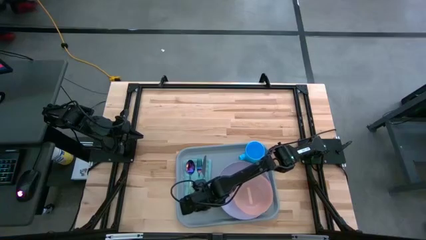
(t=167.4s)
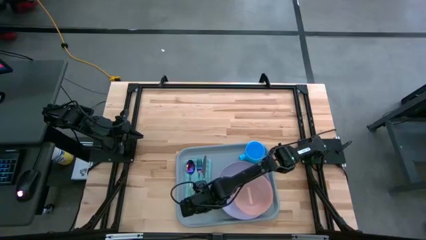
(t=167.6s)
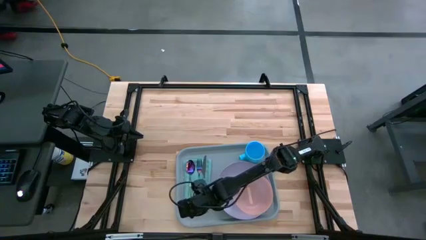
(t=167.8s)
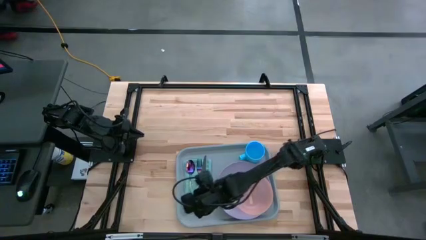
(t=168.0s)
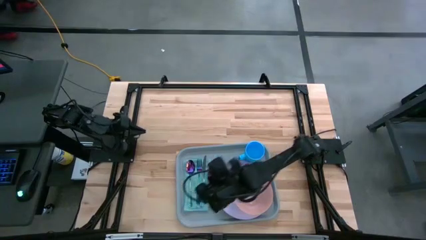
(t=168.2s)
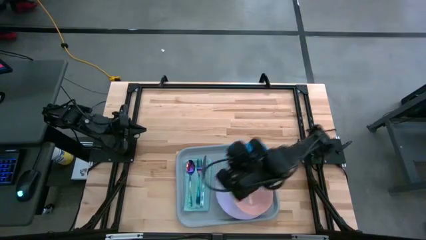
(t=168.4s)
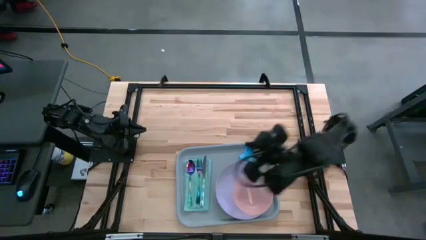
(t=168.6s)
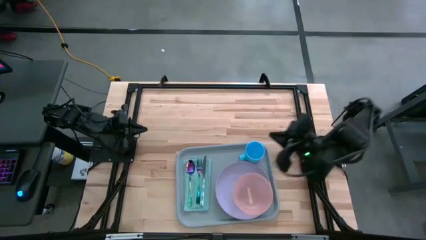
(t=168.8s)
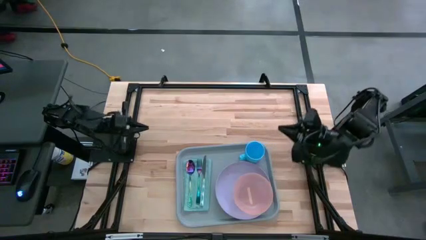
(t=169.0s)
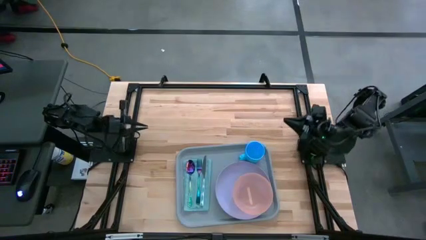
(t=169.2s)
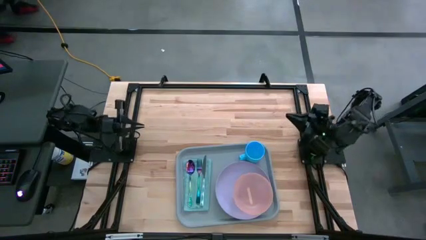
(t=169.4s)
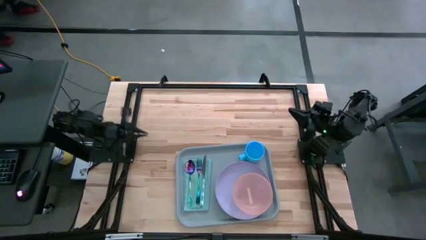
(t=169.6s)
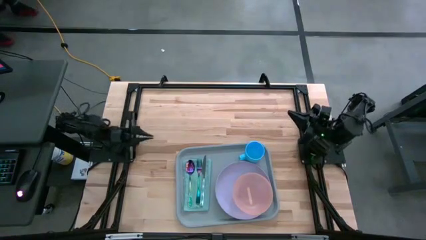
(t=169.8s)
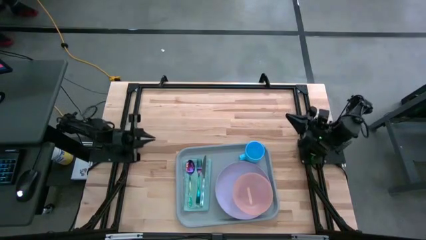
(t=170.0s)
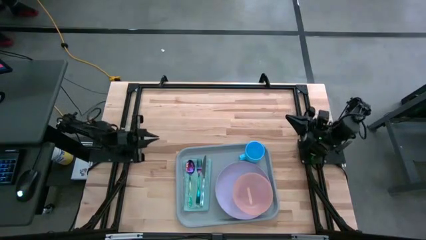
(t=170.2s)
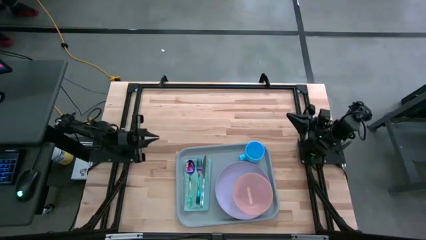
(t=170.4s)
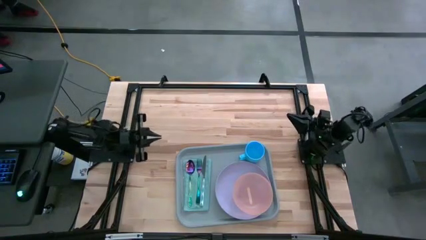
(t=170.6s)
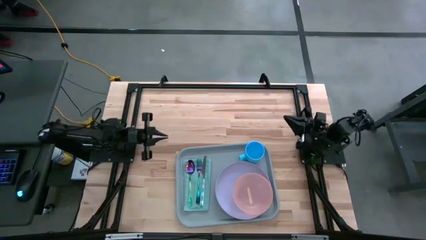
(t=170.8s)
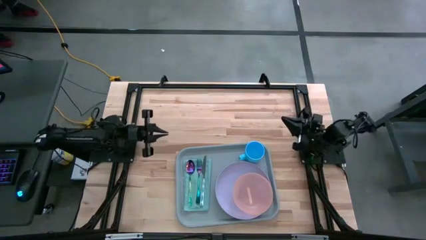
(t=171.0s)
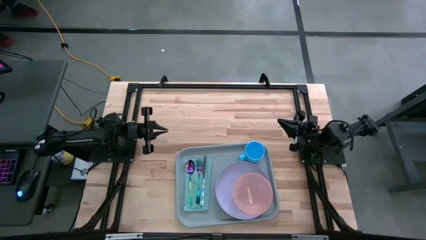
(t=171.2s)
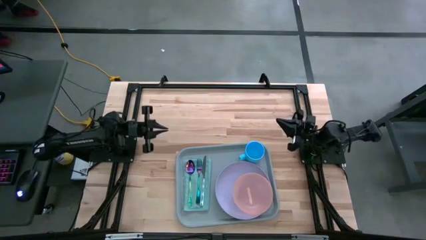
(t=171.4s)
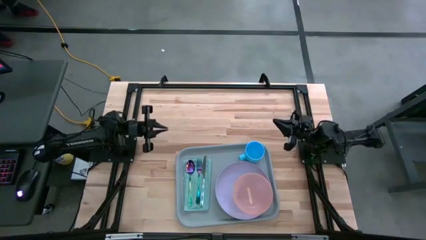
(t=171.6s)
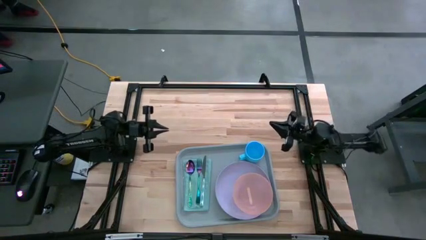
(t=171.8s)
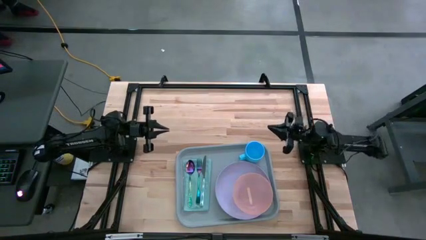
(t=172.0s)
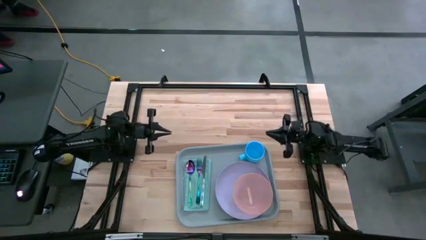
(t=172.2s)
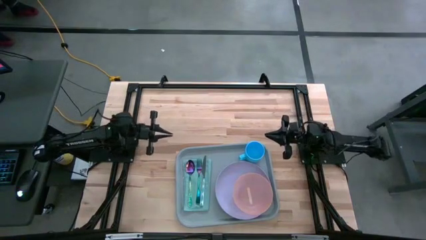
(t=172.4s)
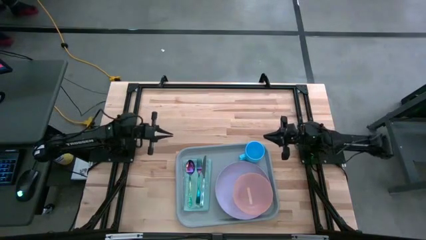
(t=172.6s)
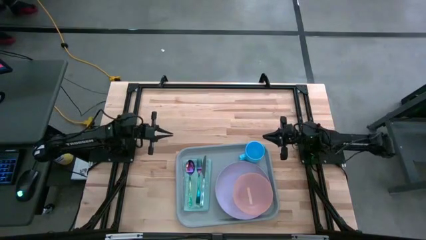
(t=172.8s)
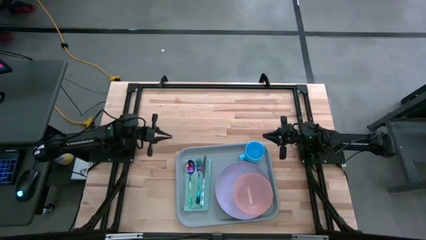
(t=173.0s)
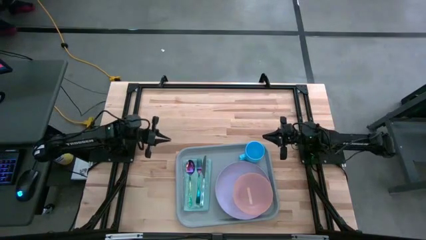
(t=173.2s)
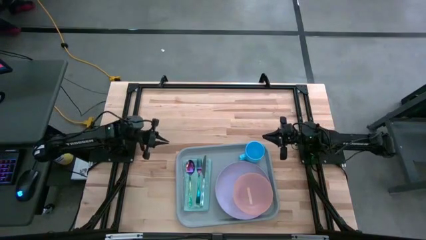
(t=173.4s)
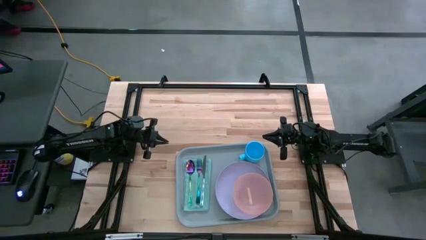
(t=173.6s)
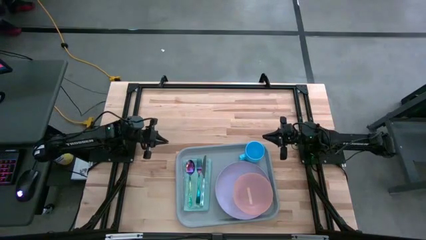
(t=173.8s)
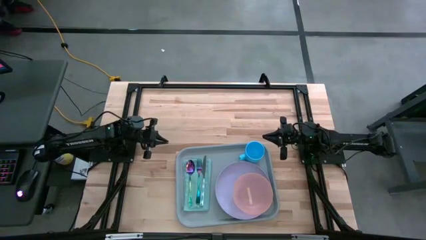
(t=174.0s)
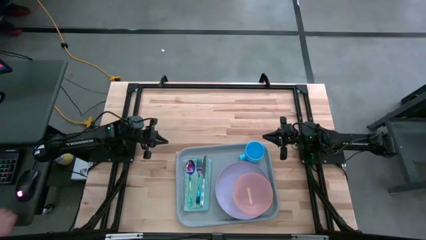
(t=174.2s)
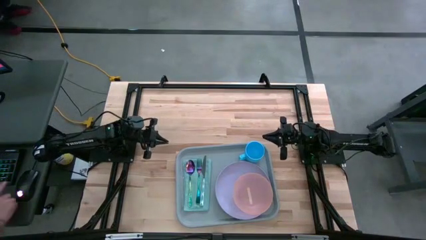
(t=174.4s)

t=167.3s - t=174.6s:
Task: Set up tray
Return to Home Position

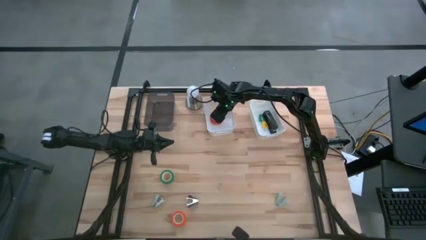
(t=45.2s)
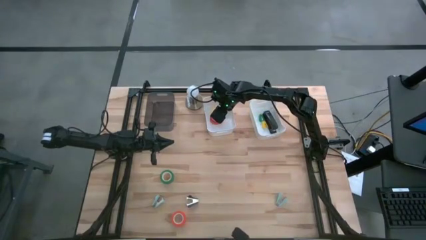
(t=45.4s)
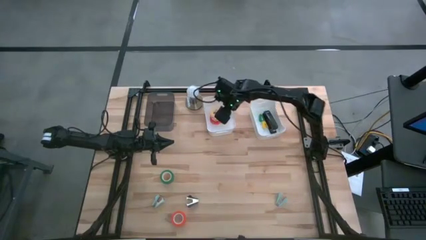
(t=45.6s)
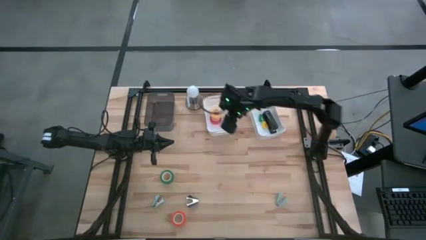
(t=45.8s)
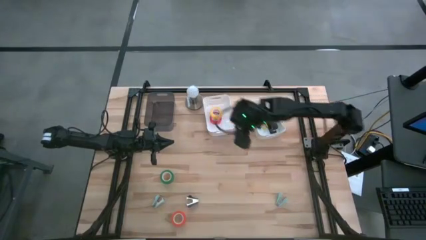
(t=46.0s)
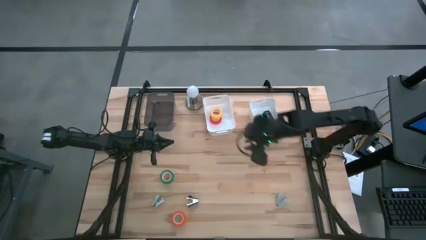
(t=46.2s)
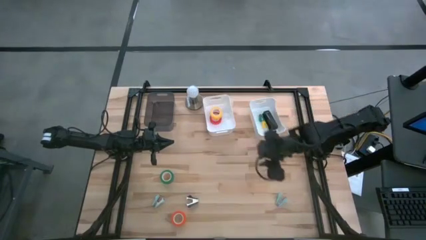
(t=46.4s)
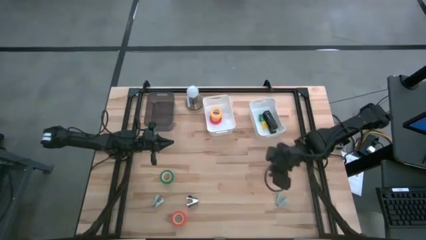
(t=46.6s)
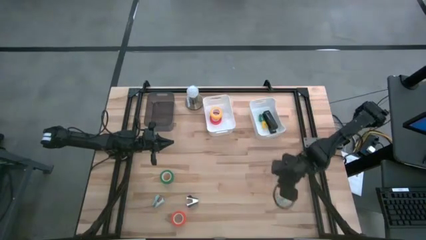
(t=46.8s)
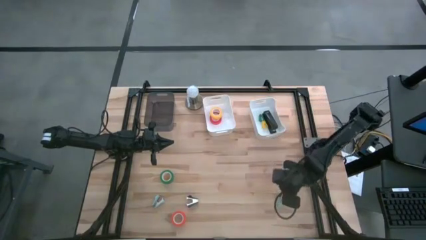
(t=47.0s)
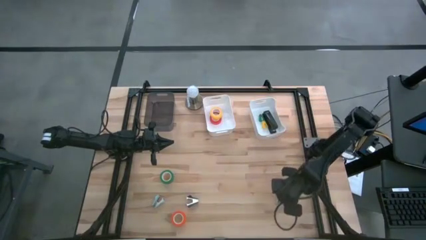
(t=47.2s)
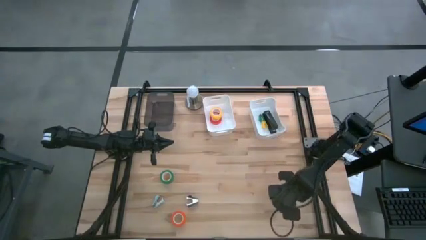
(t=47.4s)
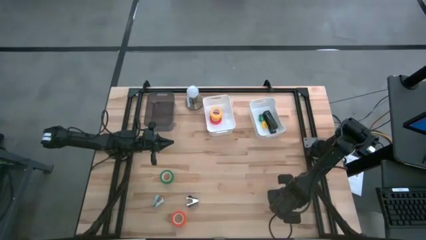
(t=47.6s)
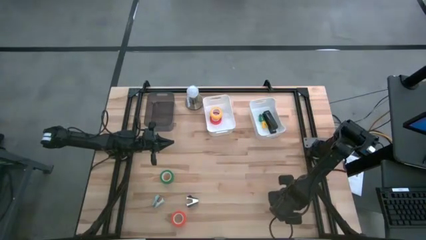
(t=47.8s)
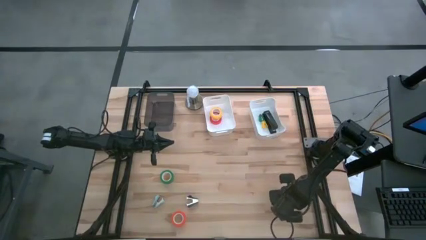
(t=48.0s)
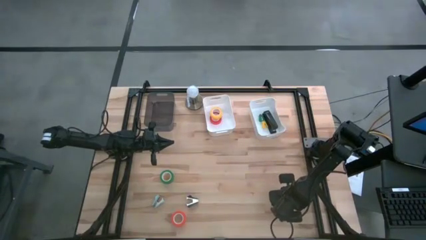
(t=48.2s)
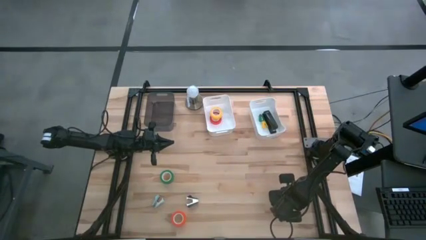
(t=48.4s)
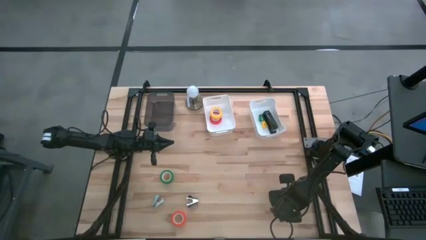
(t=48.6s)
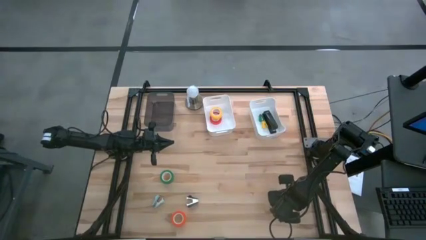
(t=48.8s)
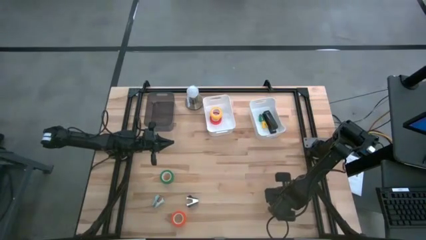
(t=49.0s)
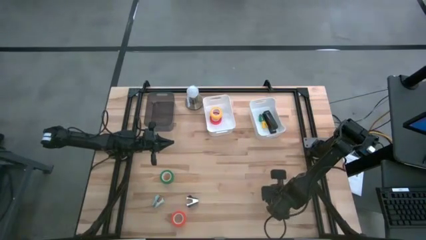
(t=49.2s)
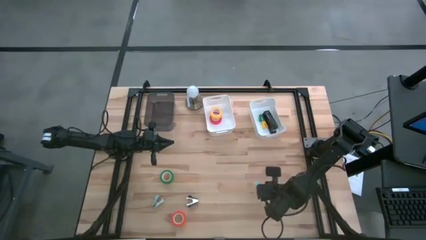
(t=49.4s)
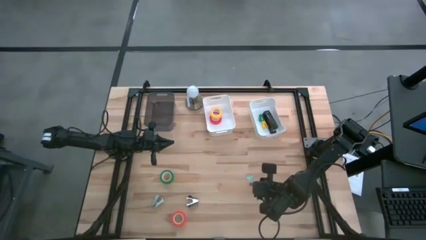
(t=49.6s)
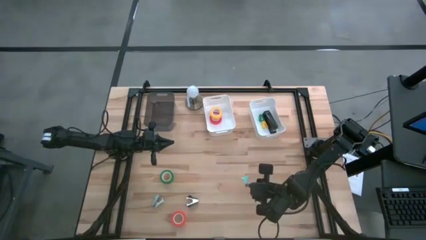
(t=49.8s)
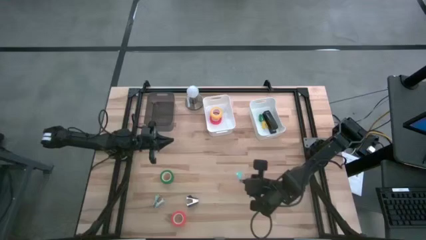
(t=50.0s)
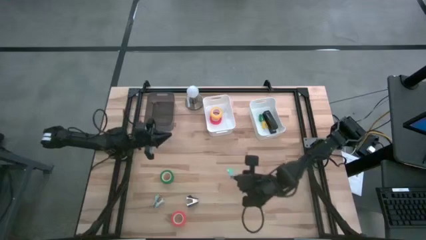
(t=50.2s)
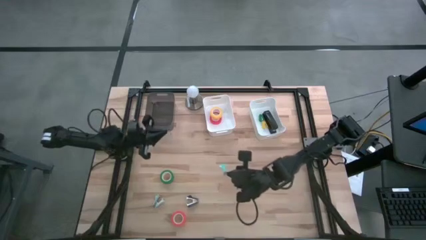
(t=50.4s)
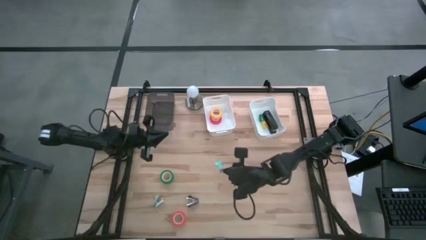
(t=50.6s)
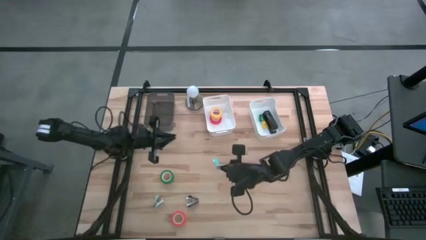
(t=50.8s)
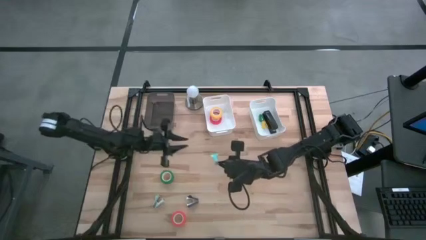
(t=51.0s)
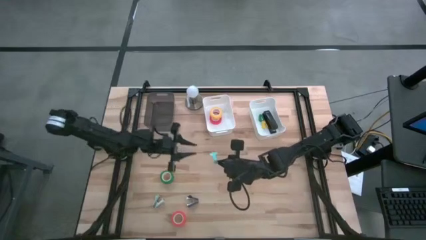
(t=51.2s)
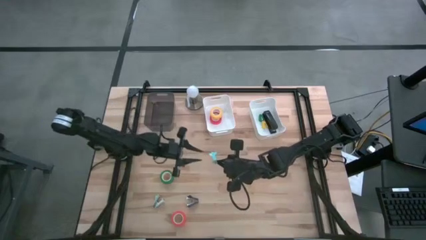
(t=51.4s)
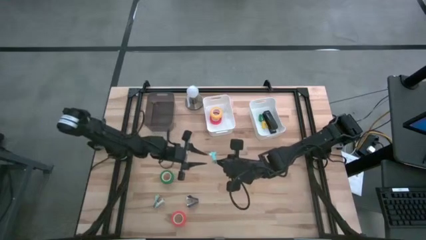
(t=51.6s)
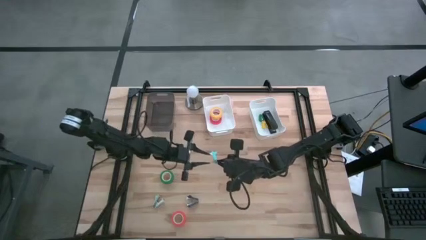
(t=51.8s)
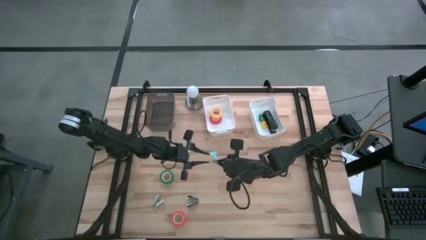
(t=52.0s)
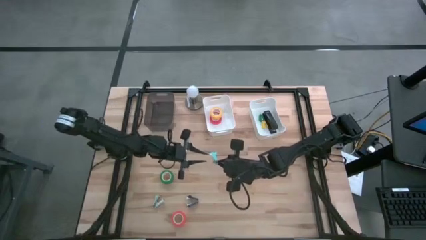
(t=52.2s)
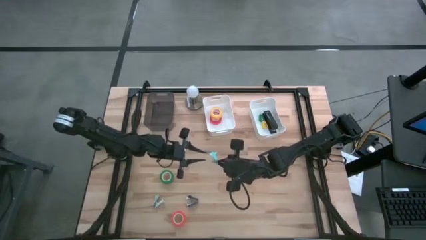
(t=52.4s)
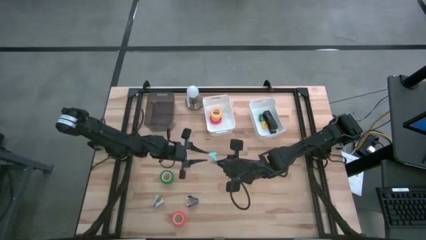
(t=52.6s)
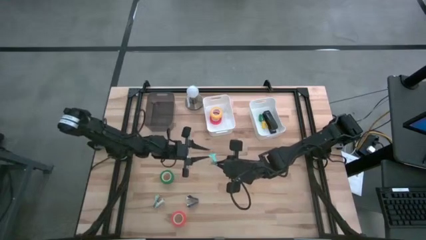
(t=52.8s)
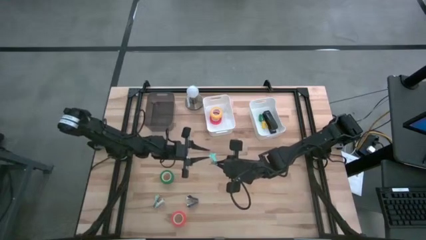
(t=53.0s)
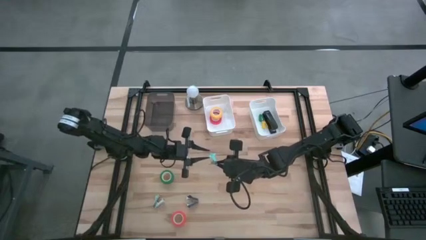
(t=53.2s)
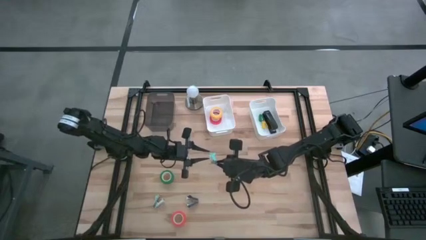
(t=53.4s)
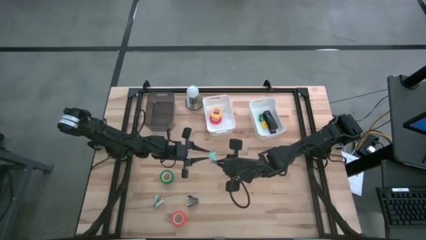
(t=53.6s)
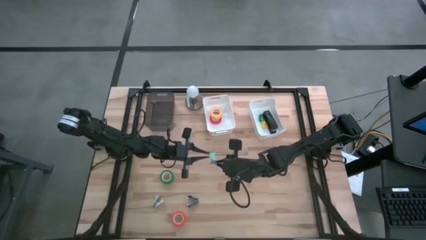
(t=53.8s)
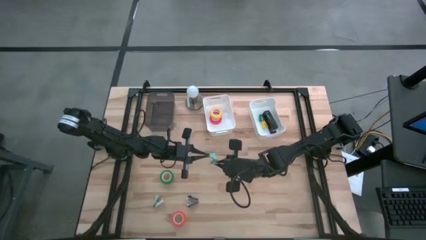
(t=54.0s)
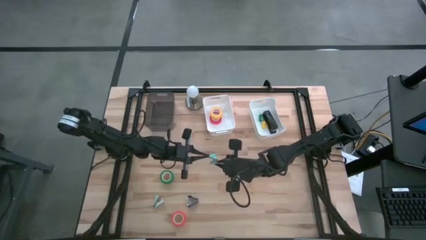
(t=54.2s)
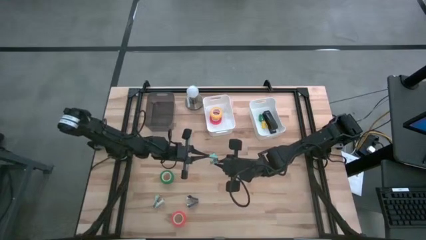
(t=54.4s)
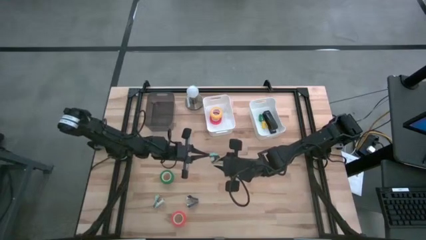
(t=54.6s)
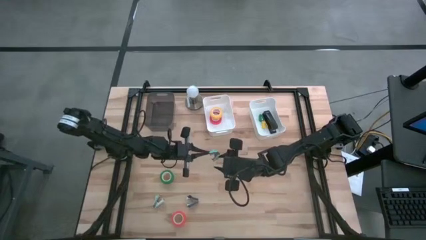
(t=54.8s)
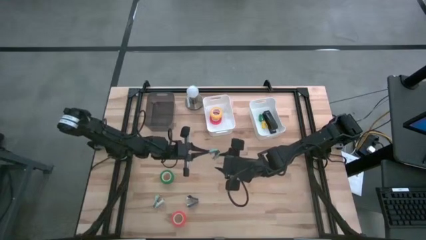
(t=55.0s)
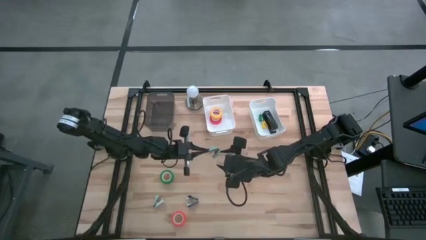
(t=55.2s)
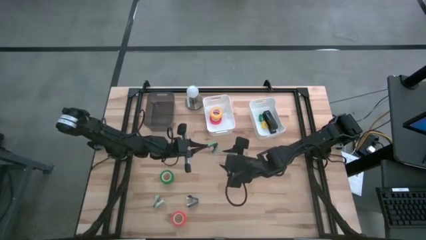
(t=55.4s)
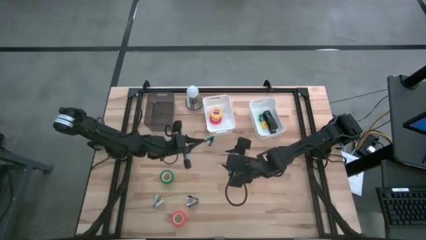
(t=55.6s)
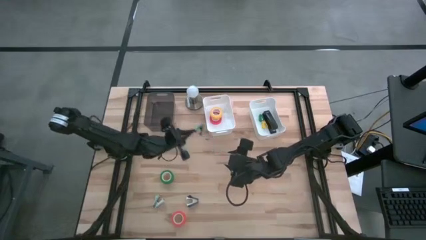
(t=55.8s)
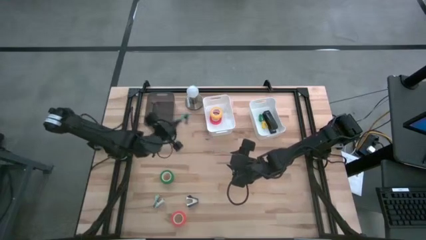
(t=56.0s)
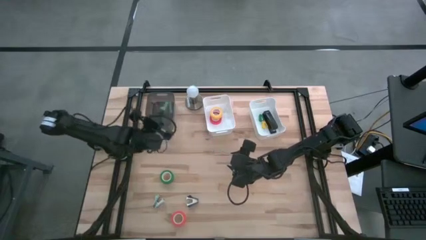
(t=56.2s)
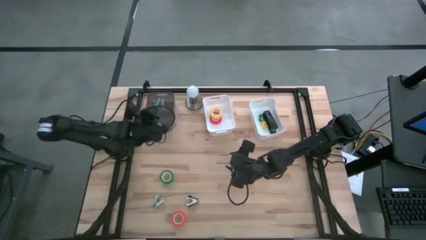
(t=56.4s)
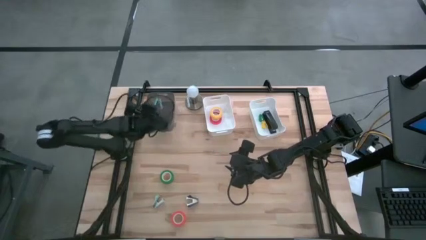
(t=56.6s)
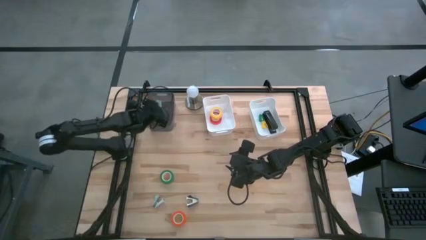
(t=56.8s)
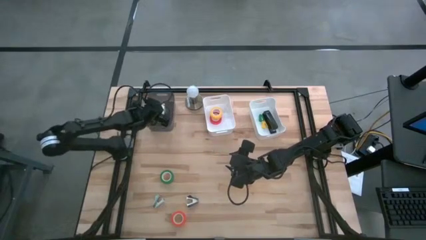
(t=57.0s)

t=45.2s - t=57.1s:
Task: Pick and place Stapler, Stapler remover, tape
Put the right blue staple remover into the black bin
